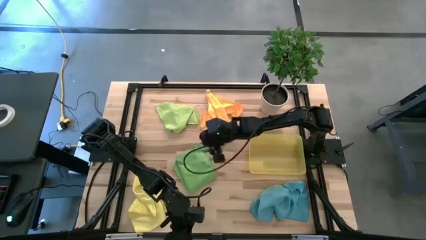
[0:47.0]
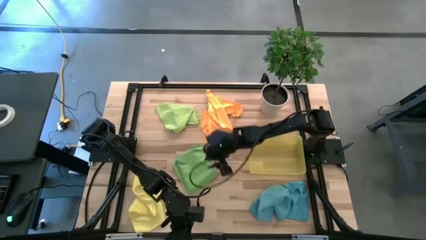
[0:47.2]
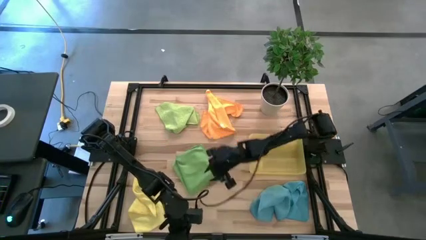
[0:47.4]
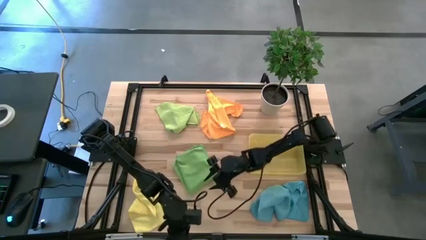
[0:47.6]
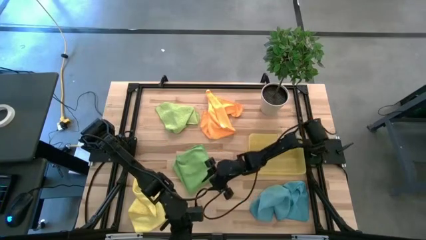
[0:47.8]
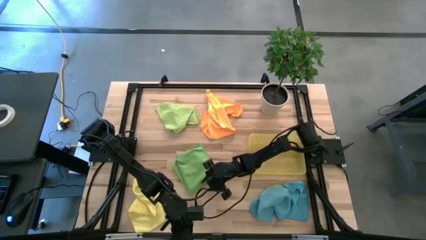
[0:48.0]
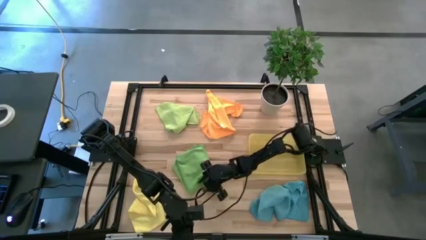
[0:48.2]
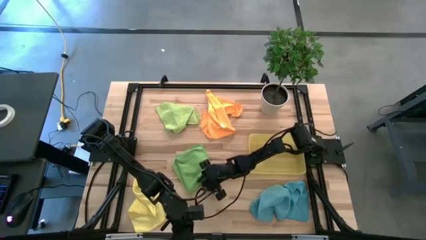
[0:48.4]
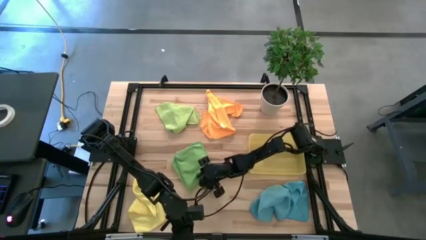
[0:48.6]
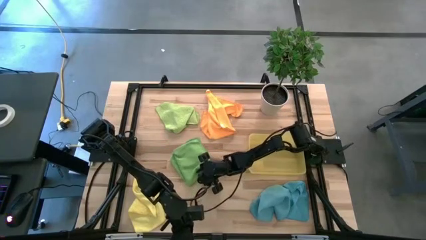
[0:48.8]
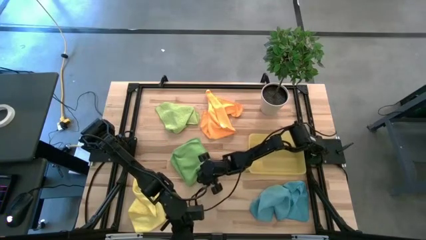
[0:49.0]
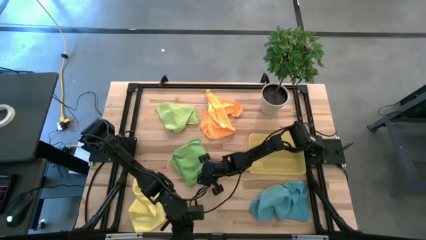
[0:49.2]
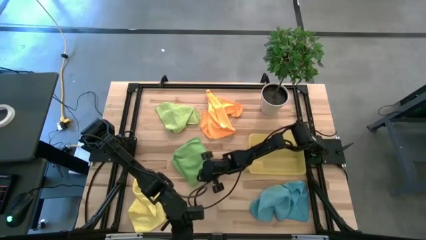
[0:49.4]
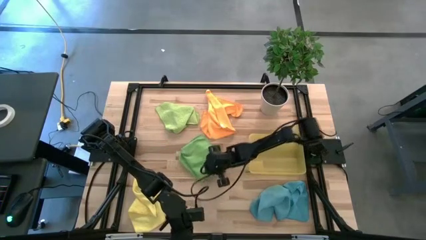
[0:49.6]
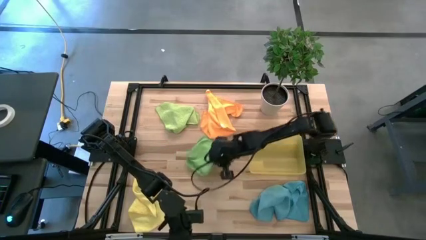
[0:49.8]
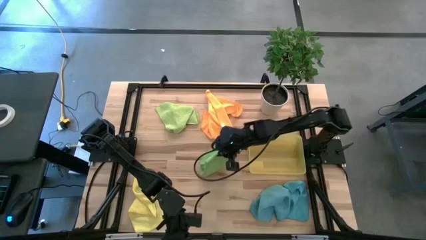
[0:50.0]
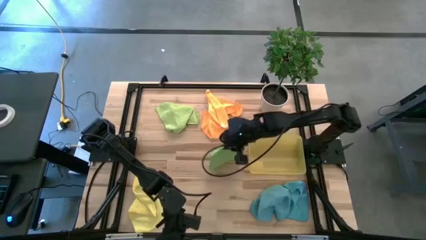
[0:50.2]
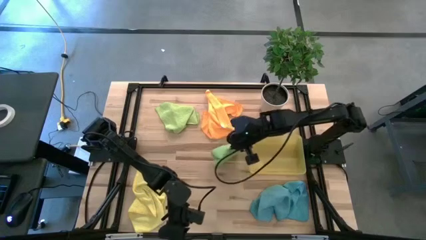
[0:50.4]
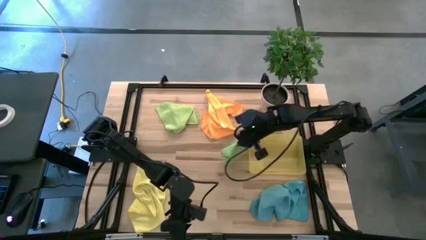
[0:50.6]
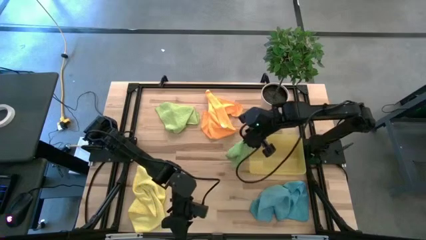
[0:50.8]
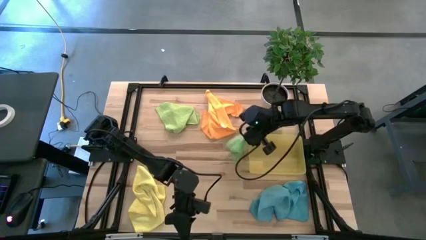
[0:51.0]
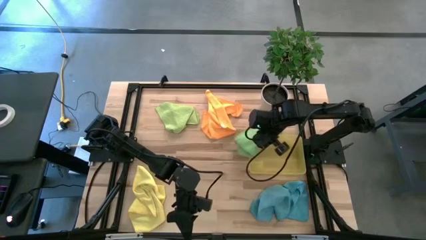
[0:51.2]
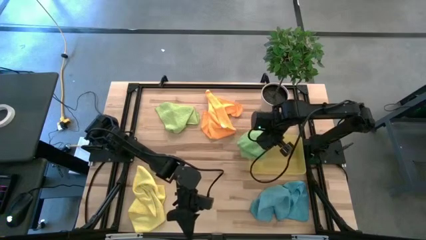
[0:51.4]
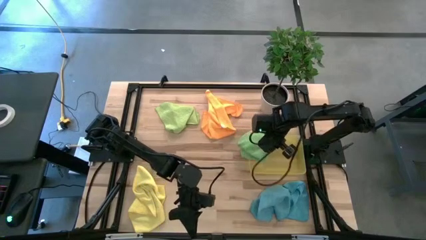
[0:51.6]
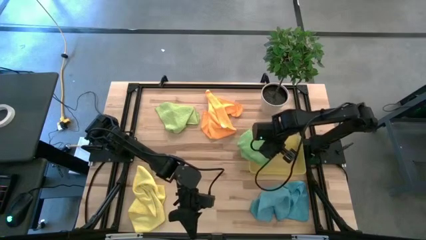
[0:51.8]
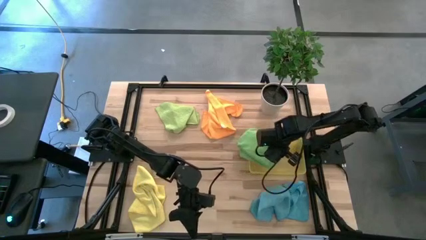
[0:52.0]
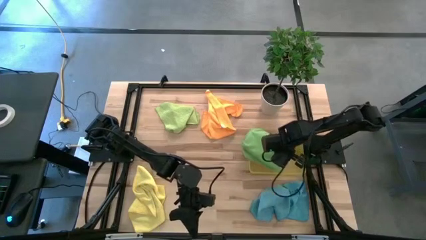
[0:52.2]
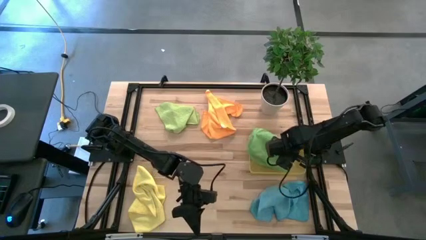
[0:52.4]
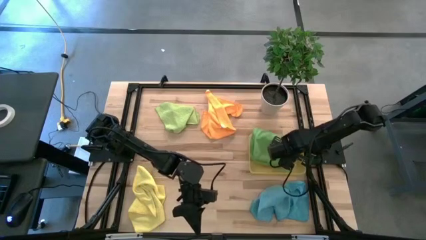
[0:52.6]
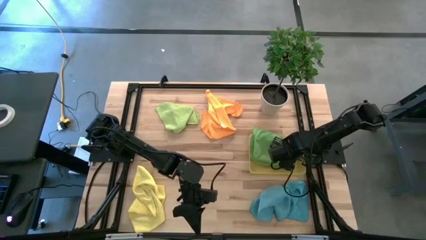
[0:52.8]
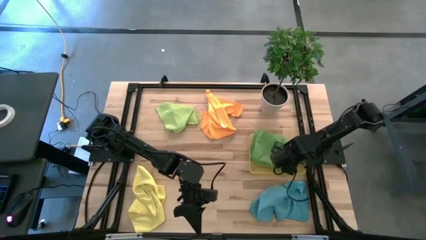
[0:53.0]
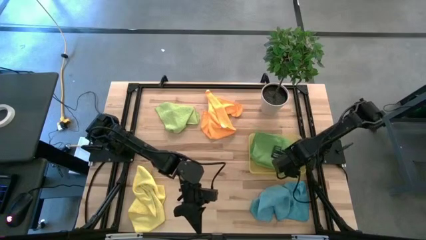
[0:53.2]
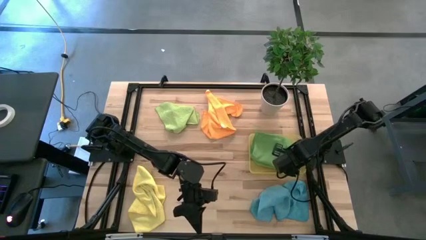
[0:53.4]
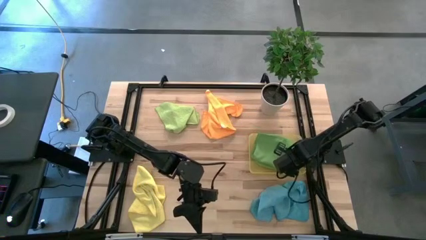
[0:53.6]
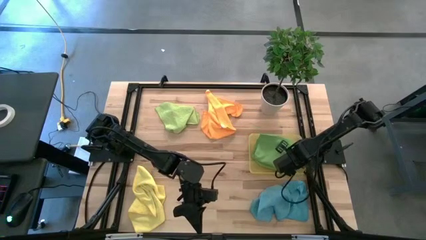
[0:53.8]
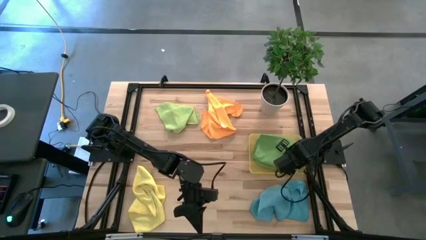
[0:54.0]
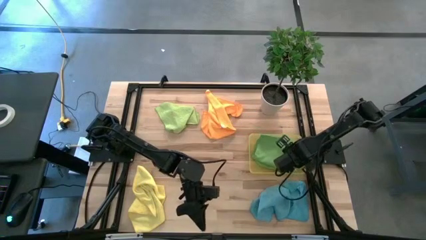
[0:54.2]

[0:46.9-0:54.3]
Task: Fold microfiber towels
Put the bottom green microfiber cloth into the yellow bin

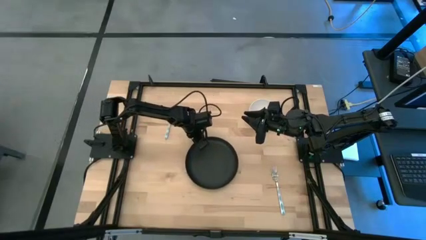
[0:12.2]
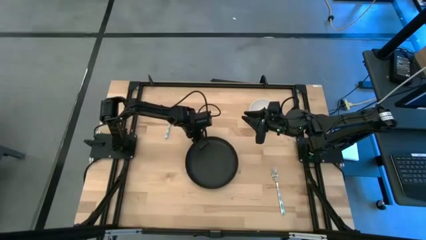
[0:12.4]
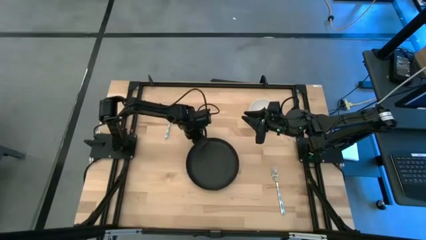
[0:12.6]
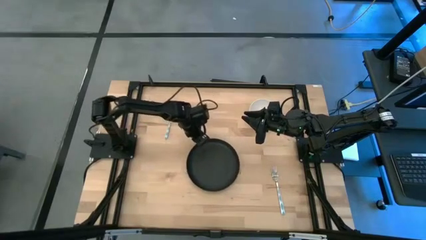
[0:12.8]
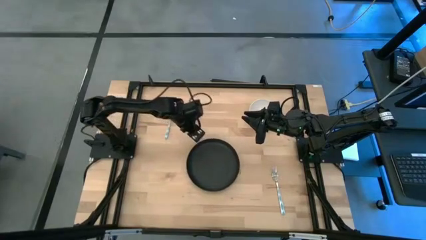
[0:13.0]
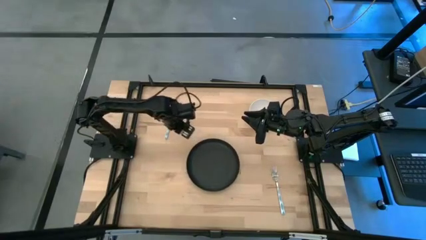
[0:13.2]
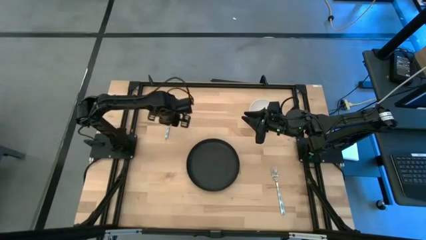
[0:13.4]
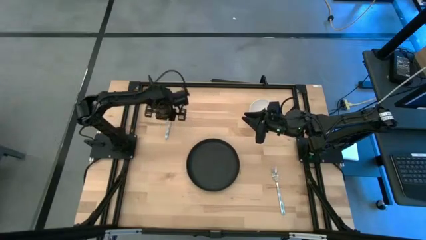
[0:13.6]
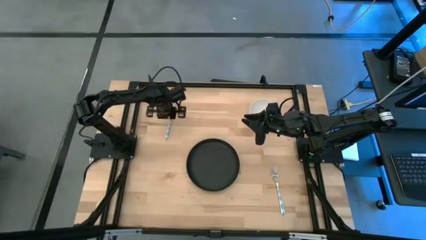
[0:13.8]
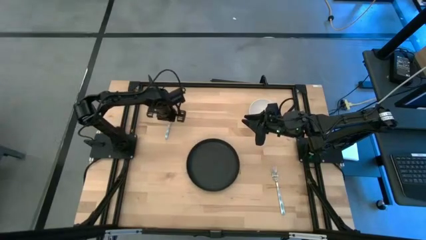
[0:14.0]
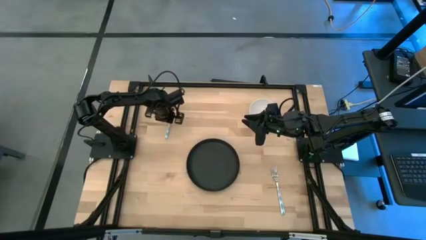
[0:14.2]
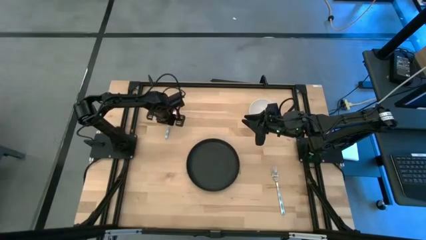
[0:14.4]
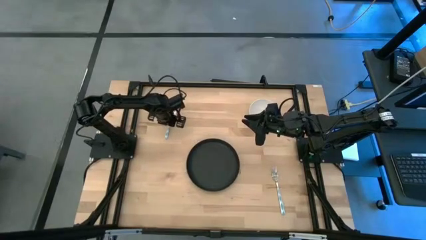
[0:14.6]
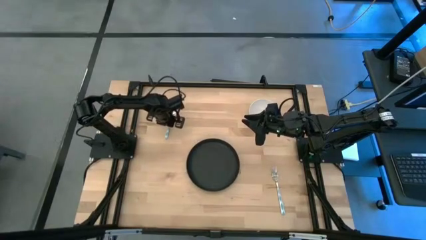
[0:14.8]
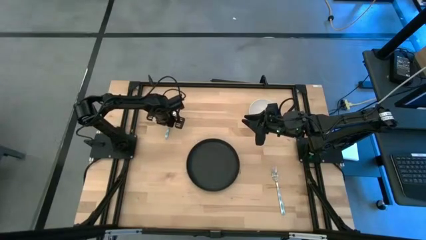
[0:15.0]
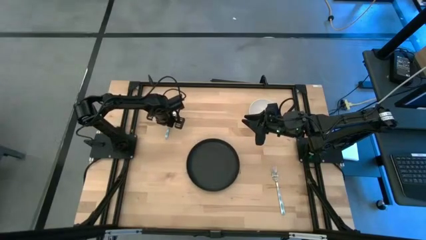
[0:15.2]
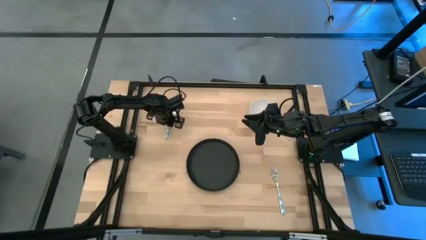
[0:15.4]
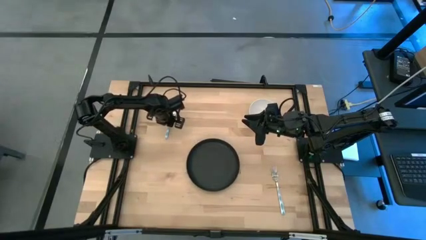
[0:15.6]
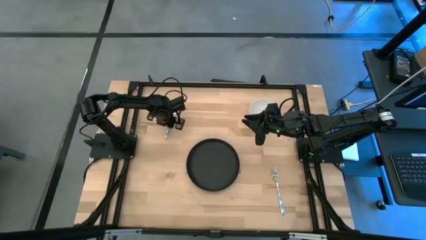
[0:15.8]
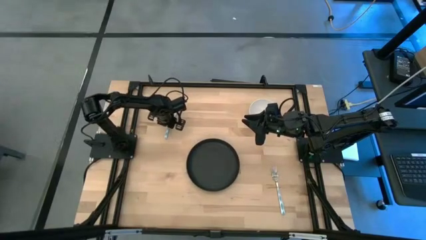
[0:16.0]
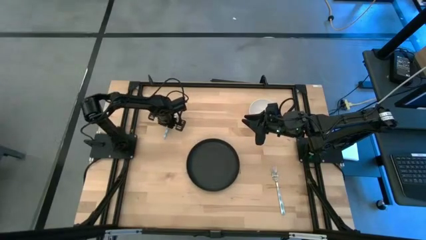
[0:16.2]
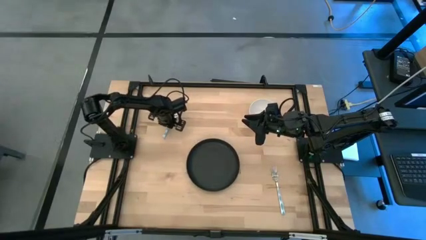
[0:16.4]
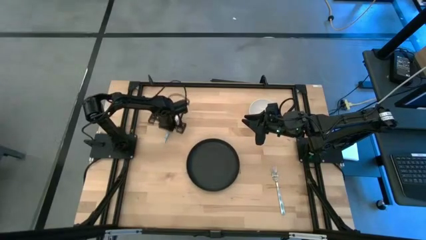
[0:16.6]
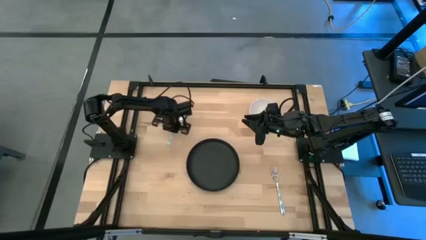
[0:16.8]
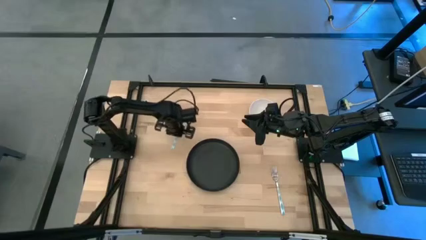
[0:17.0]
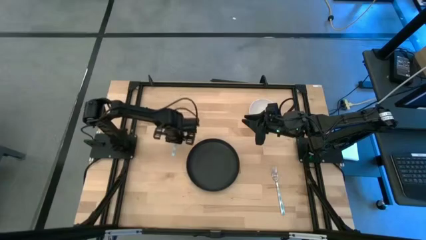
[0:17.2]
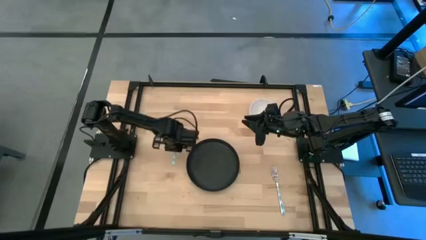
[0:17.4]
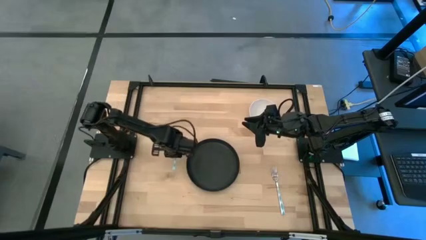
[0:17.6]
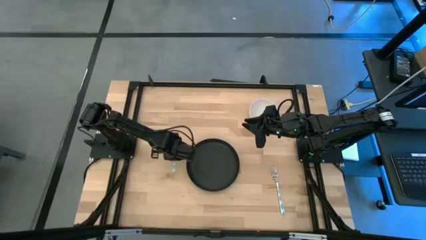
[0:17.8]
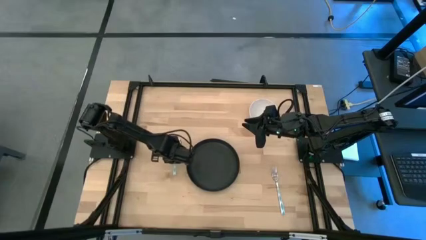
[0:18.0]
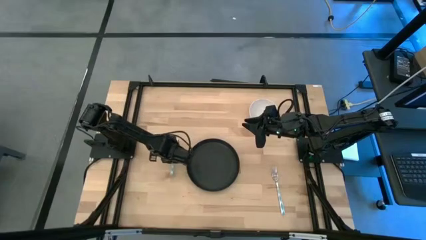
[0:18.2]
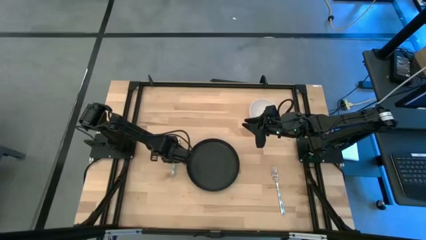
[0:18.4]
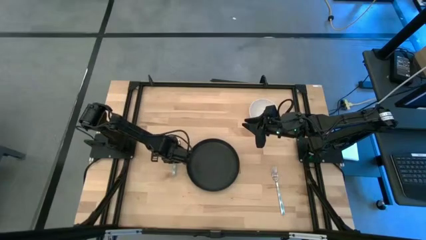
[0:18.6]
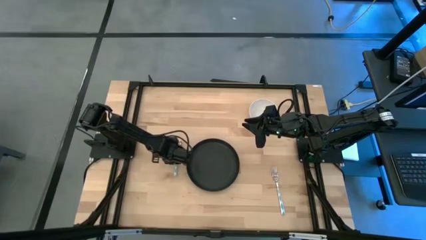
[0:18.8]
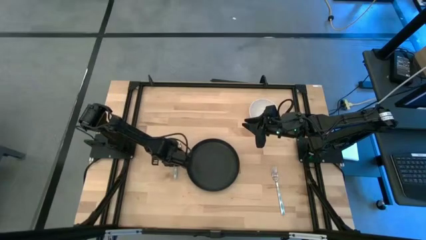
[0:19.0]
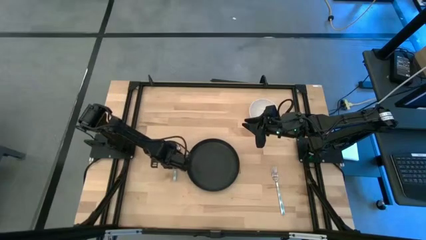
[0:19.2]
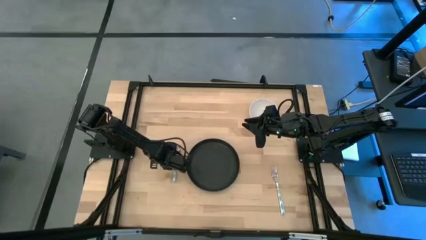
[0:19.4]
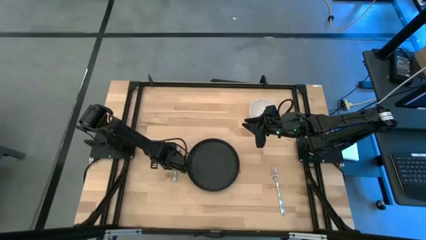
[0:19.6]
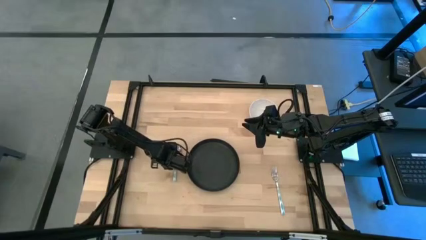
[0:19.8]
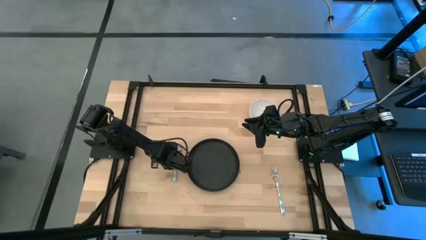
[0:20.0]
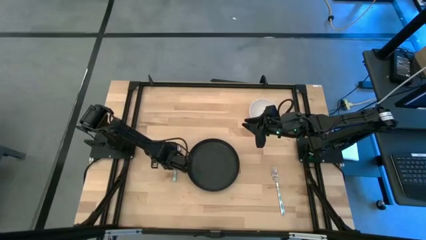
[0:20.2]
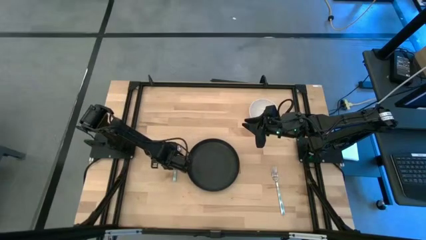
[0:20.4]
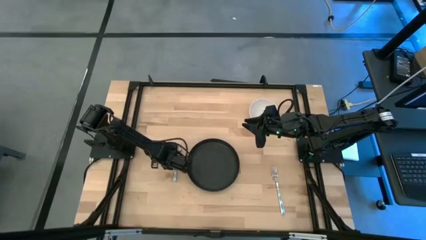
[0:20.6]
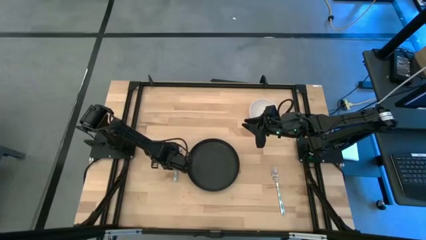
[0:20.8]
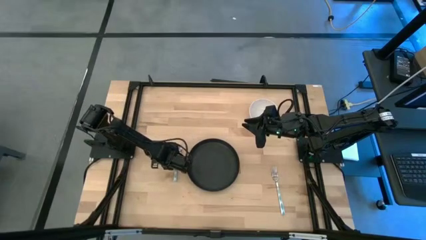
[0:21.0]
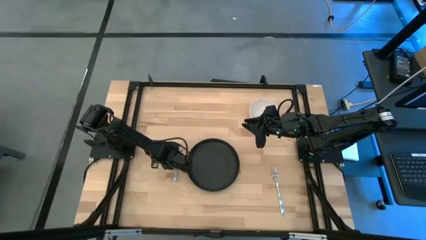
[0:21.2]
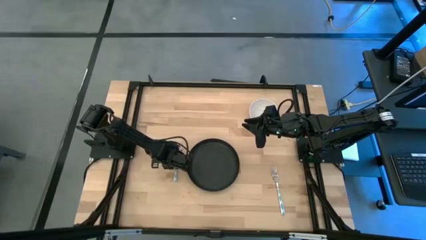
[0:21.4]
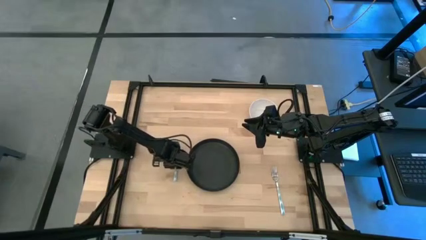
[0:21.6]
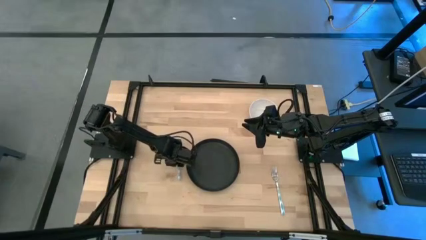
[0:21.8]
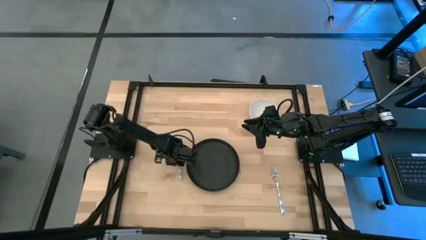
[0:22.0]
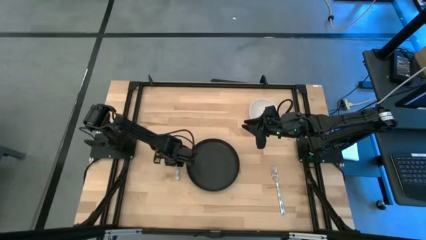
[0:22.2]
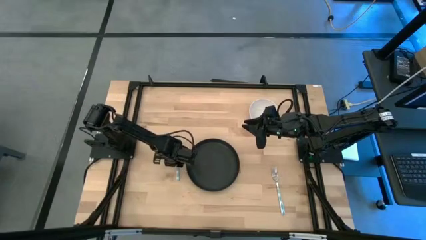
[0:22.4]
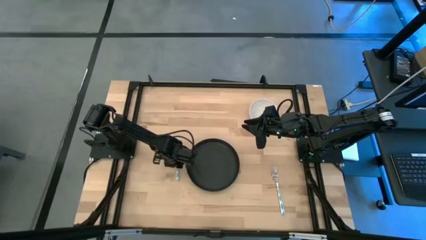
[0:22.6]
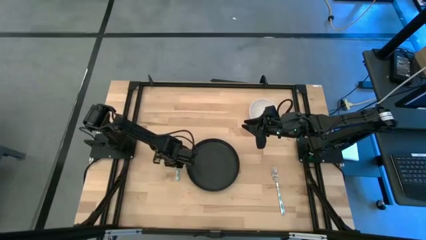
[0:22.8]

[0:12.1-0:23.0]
Task: Set table place
Put the green spoon on the left side of the black plate
